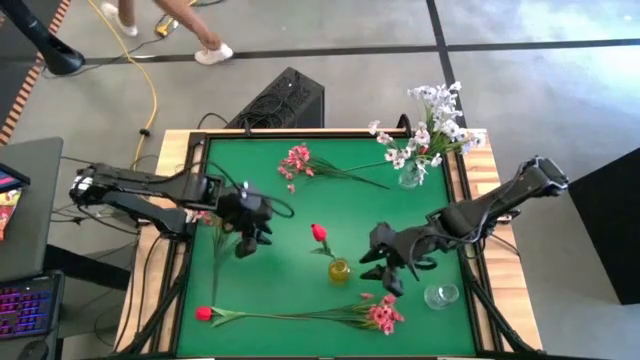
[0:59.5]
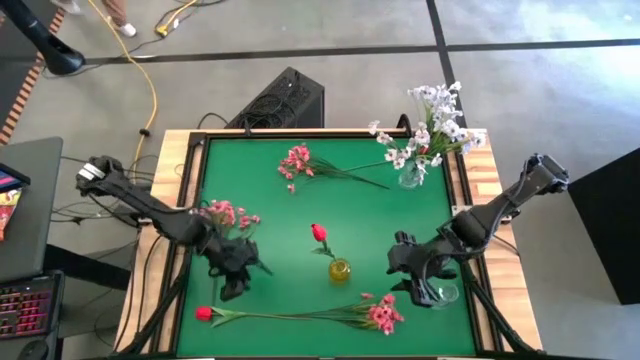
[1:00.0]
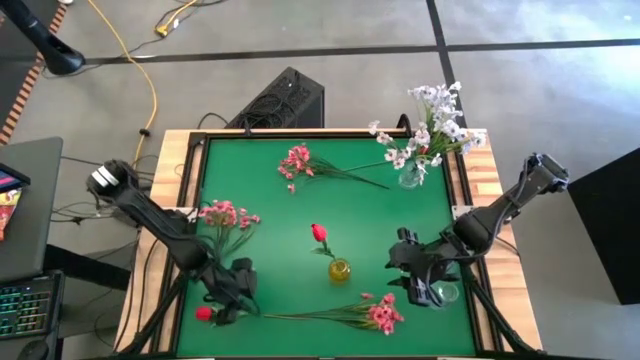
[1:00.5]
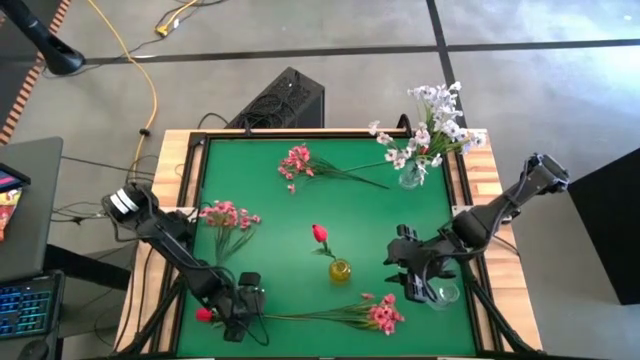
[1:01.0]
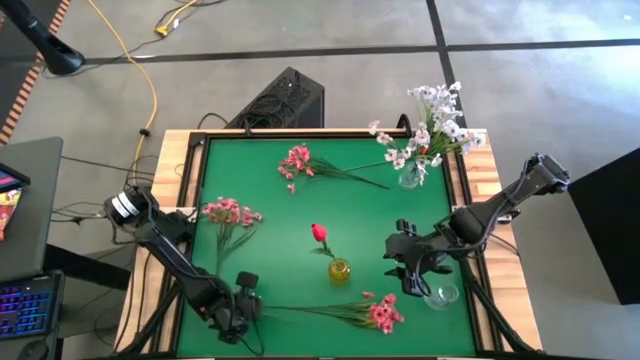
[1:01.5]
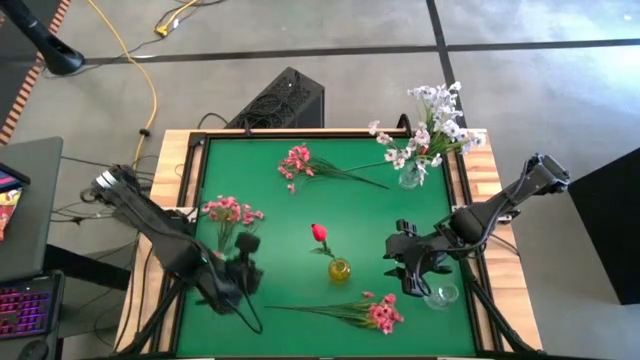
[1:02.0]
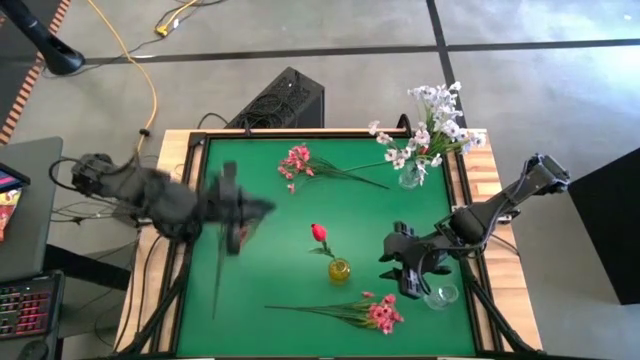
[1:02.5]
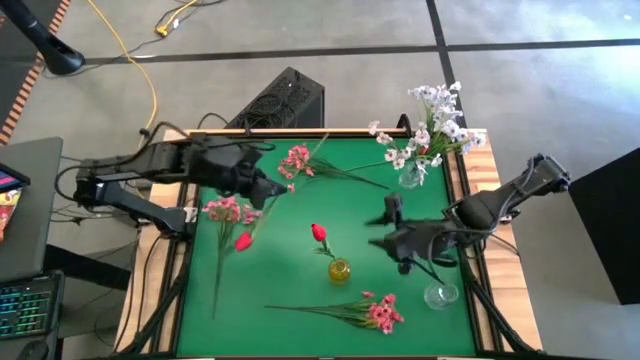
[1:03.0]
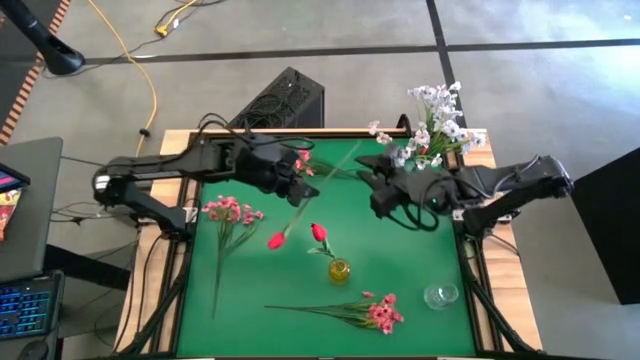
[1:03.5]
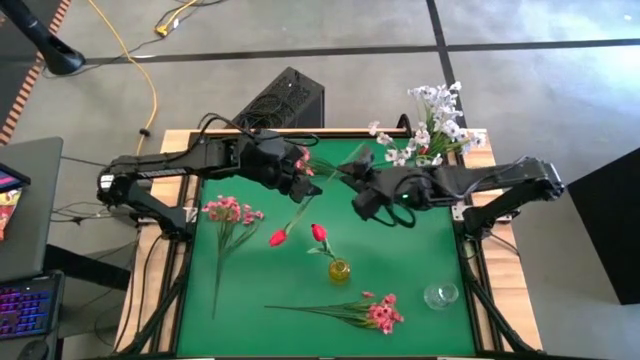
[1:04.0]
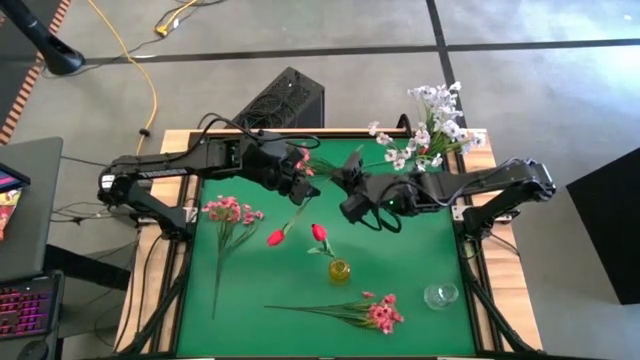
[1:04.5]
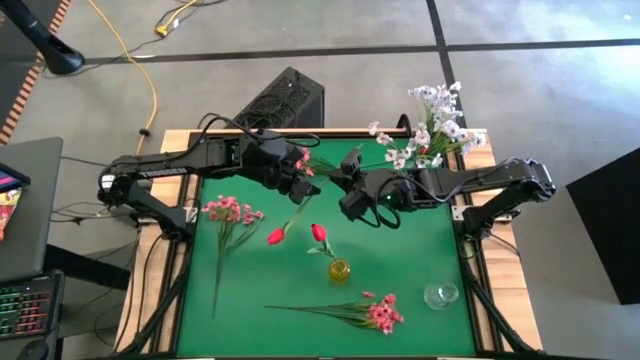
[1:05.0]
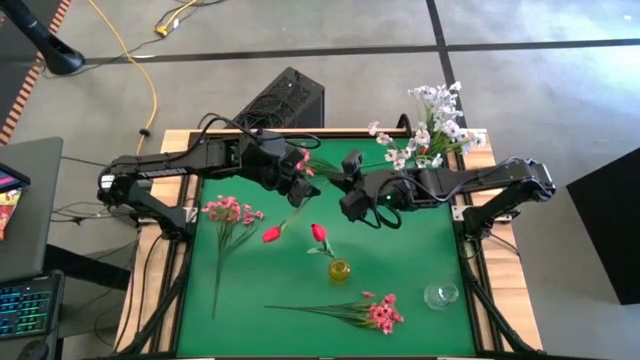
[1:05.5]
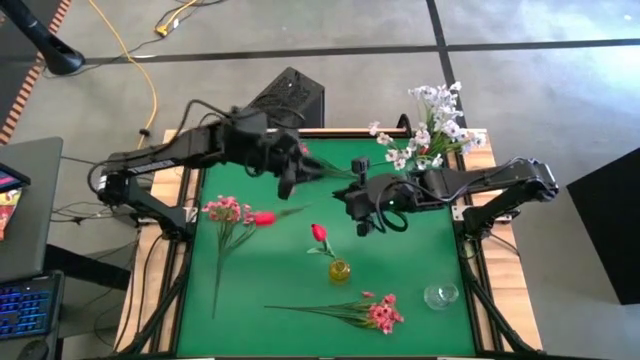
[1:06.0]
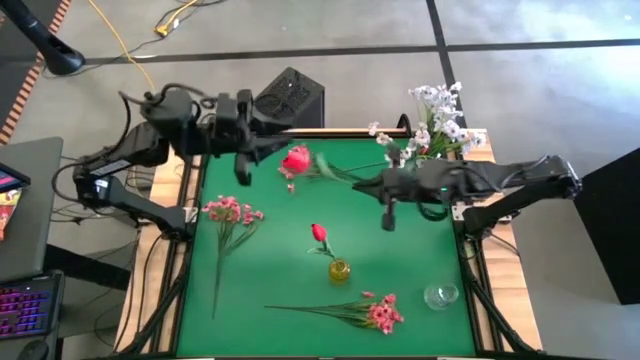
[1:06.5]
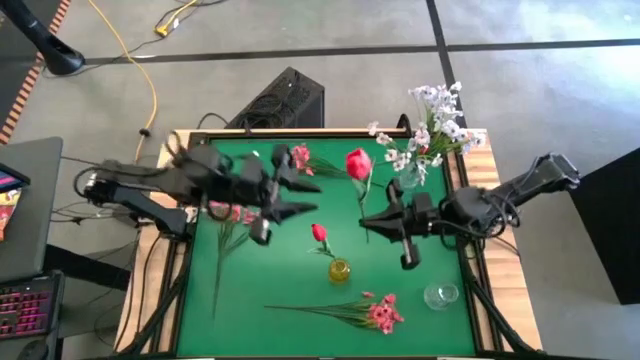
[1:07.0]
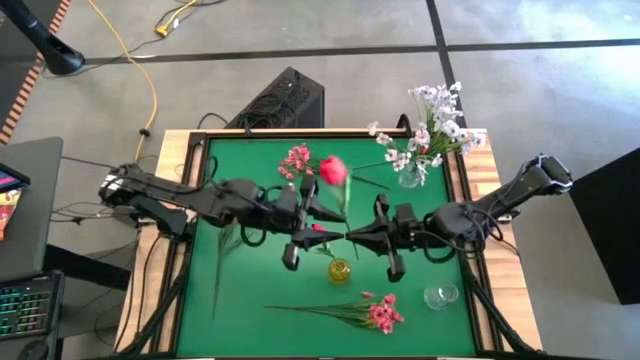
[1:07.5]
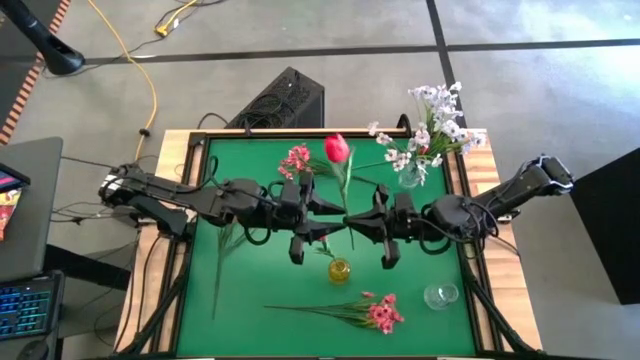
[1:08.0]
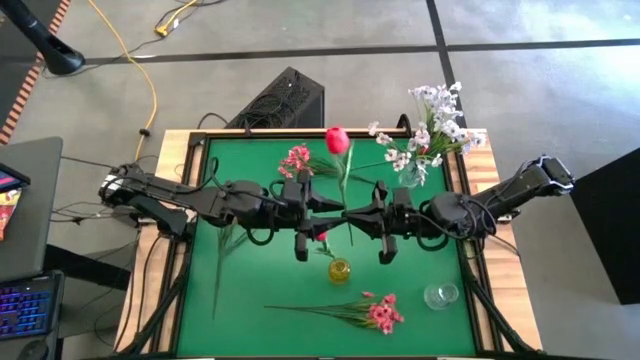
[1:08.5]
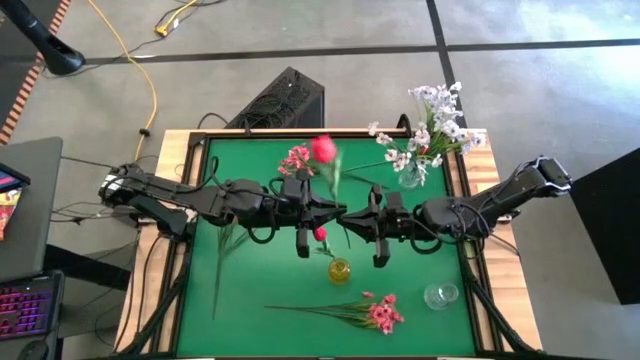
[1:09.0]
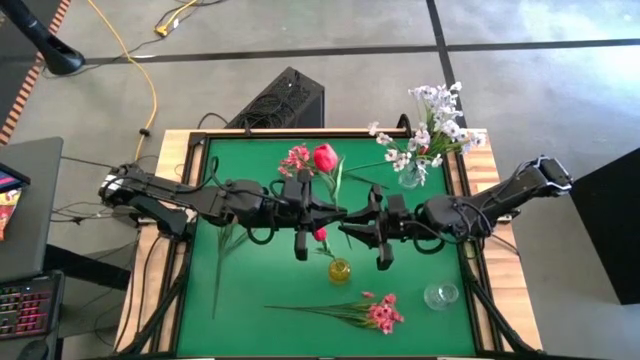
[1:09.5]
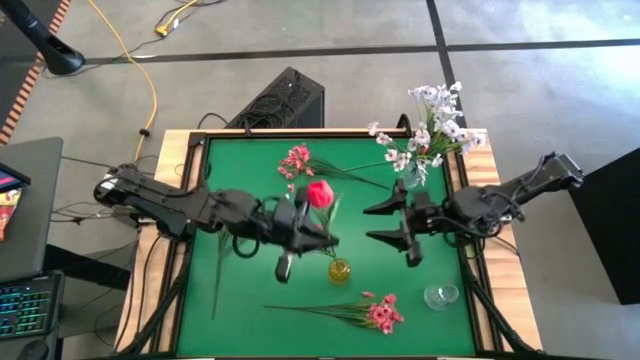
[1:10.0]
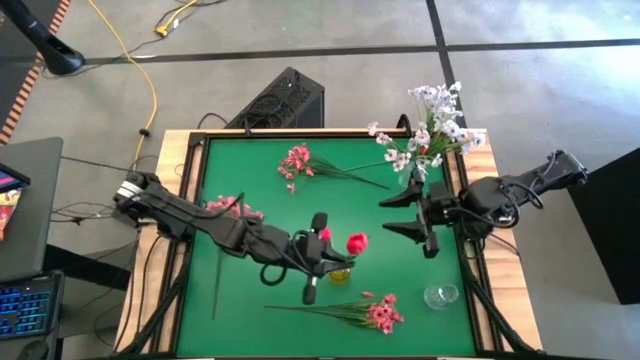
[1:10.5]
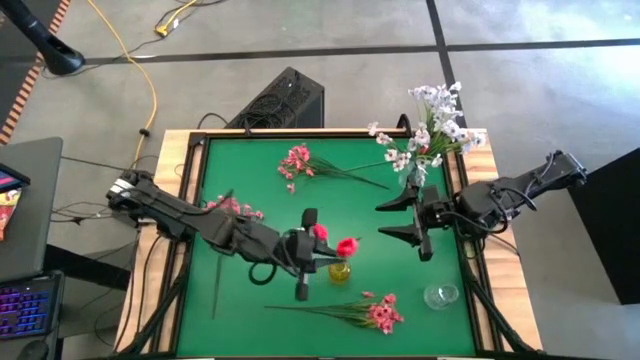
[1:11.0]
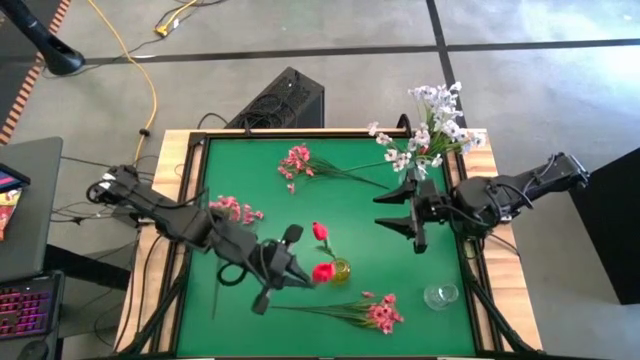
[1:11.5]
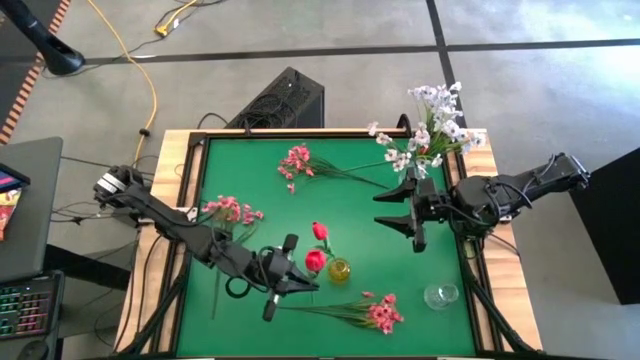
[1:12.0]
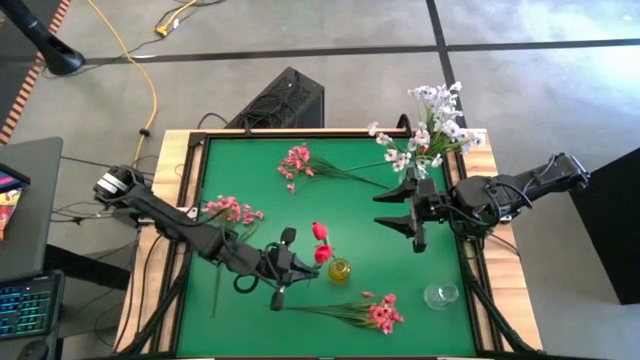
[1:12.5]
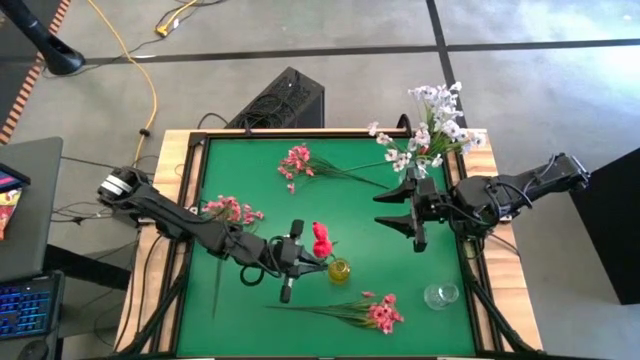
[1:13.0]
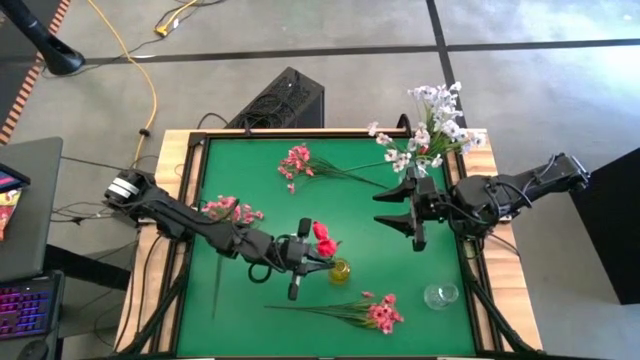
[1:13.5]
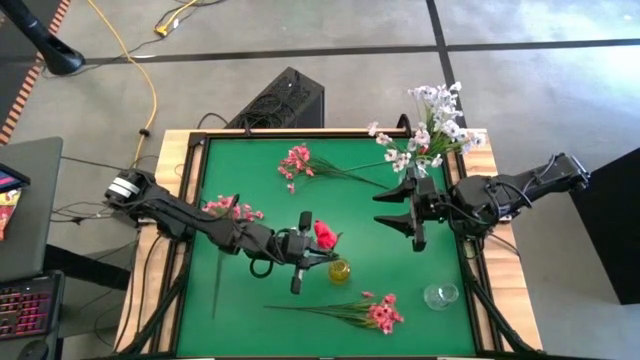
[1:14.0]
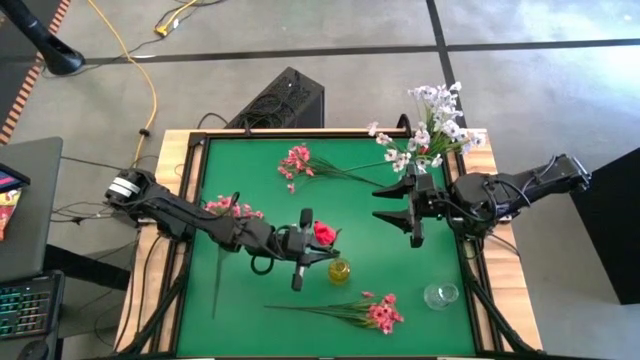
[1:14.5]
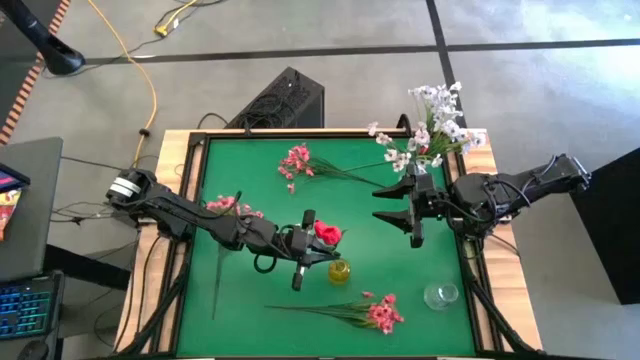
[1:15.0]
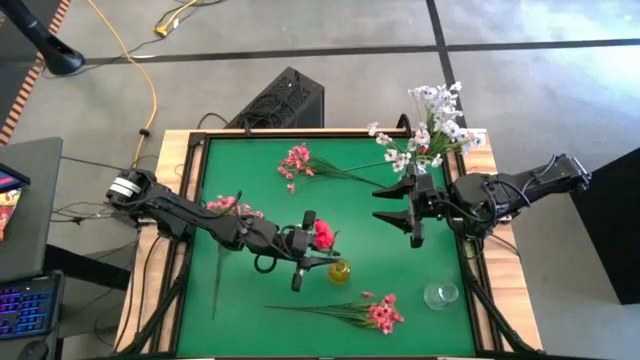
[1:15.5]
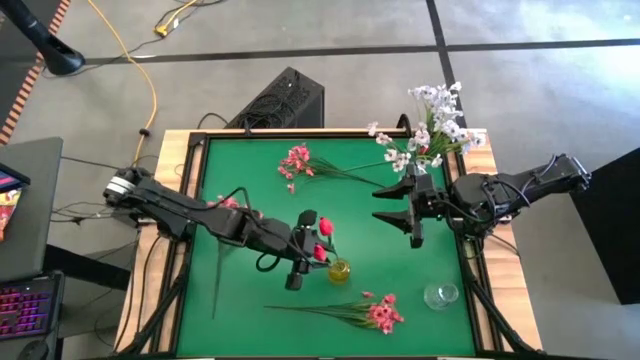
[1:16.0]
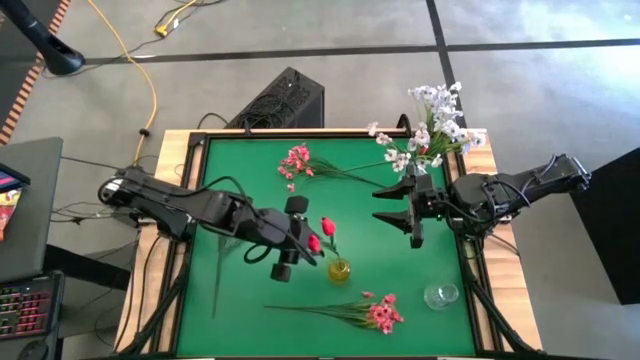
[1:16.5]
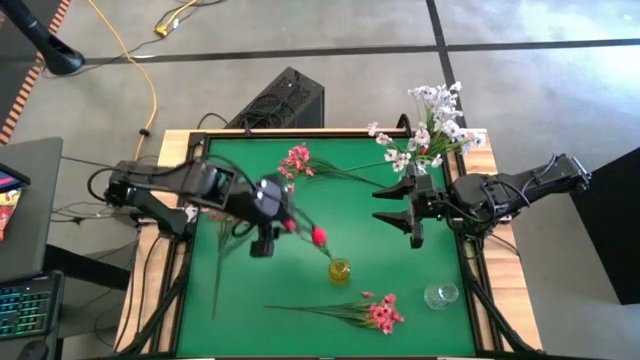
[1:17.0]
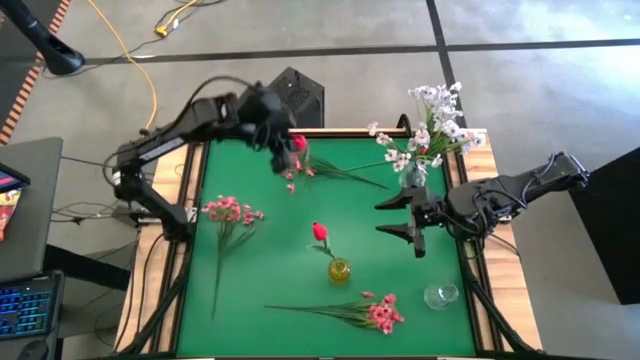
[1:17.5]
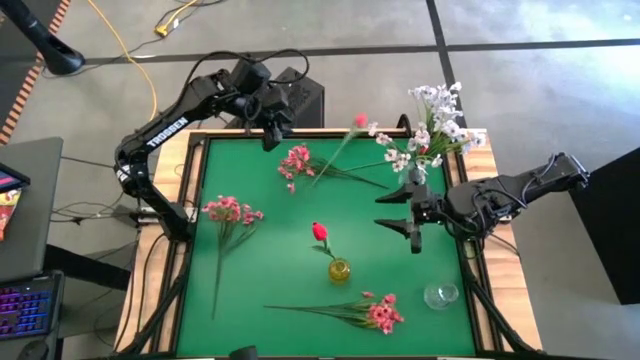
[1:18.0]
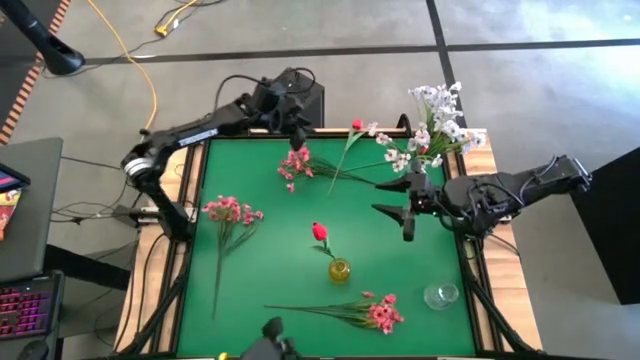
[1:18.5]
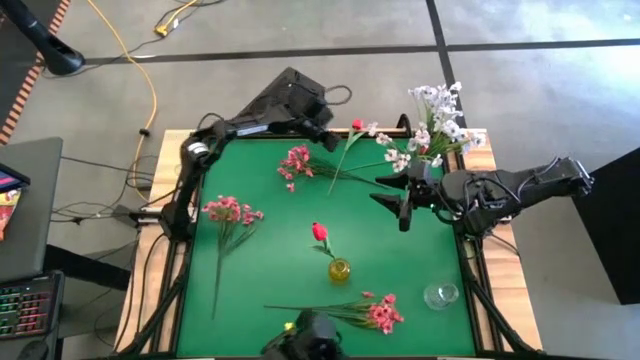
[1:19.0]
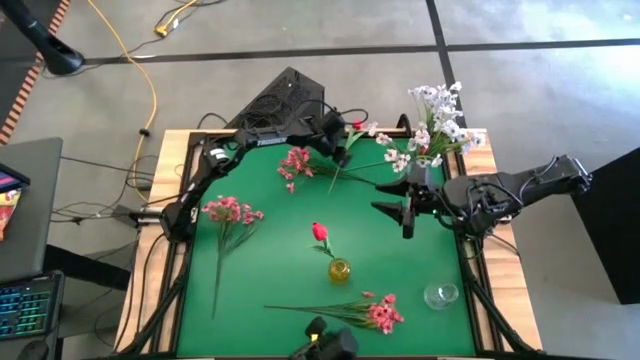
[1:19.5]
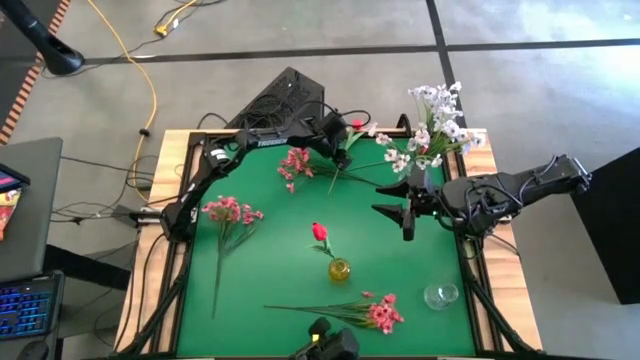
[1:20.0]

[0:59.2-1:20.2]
Task: Sort flowers into vase by color
Put the bottom red tulip into the yellow vase

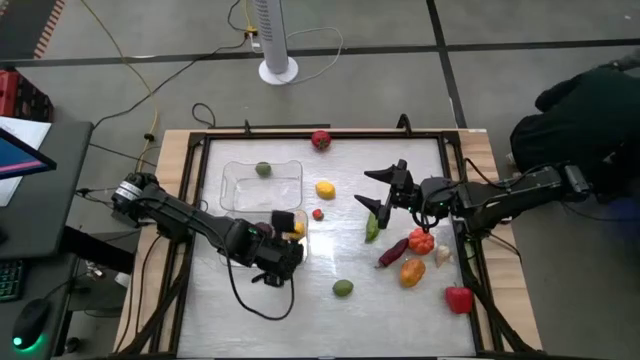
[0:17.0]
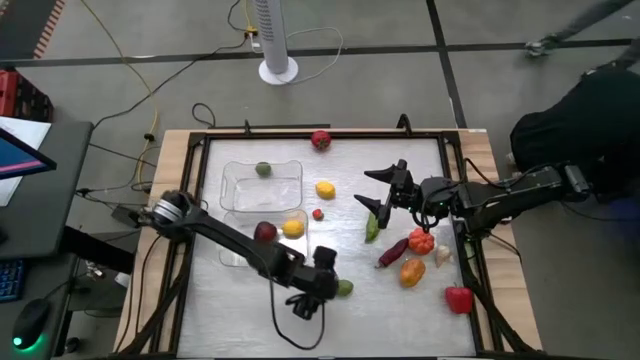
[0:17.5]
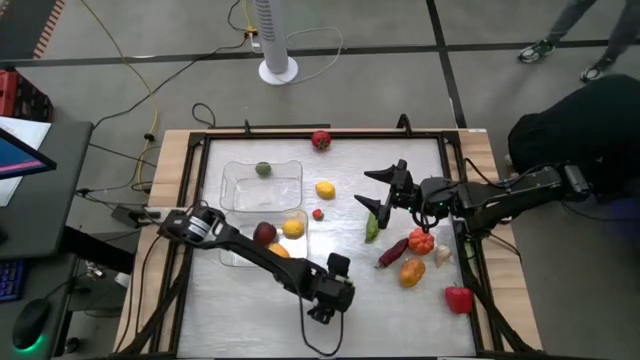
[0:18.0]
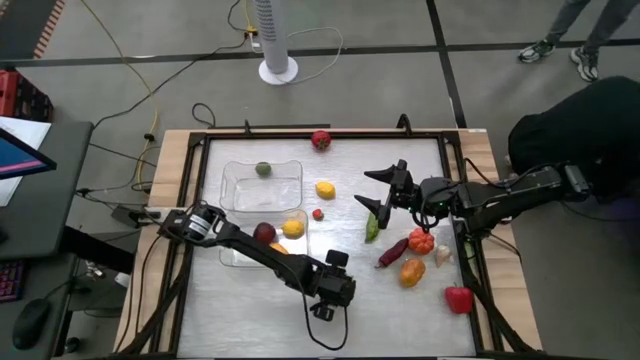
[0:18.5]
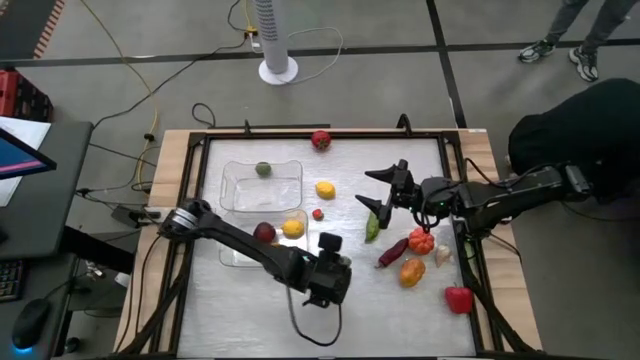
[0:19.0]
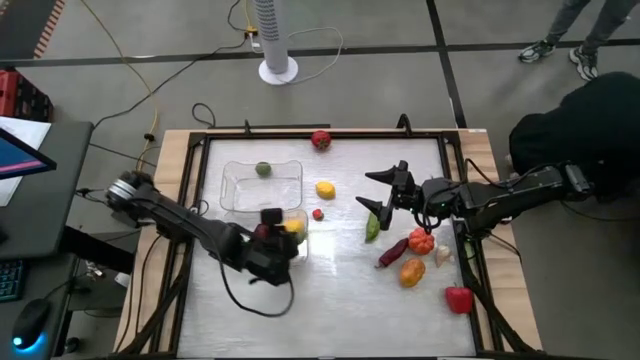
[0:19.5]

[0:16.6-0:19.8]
Task: Sort produce into baskets
Put the bottom green lime into the bottom transparent bin
